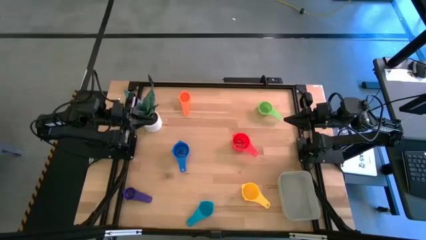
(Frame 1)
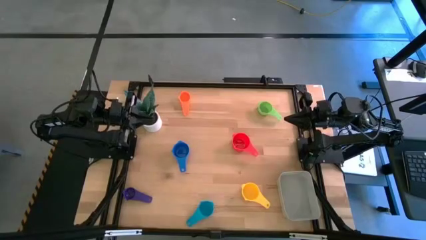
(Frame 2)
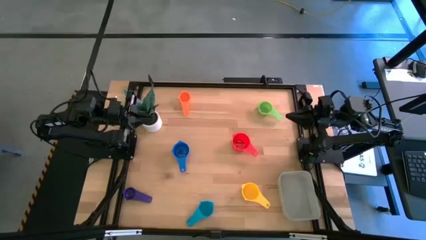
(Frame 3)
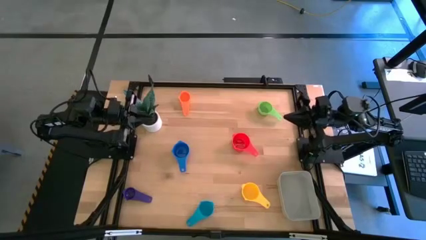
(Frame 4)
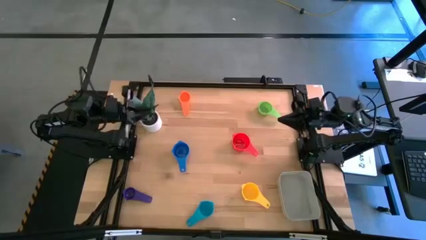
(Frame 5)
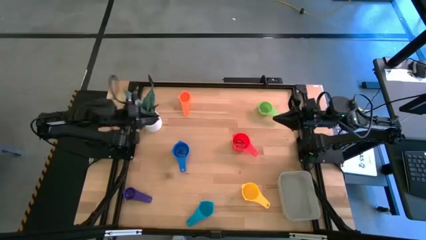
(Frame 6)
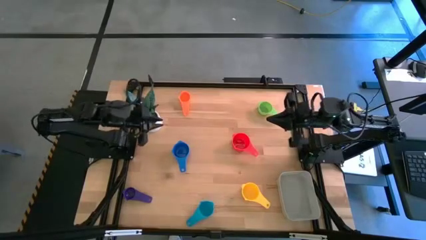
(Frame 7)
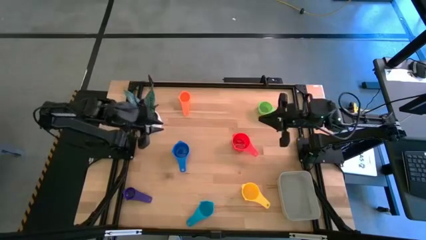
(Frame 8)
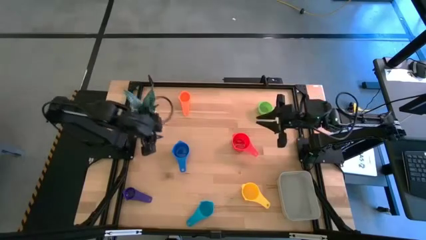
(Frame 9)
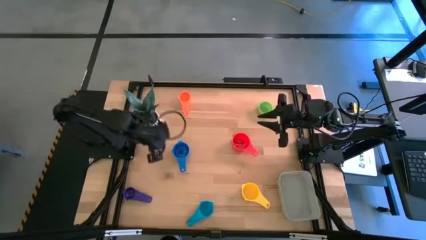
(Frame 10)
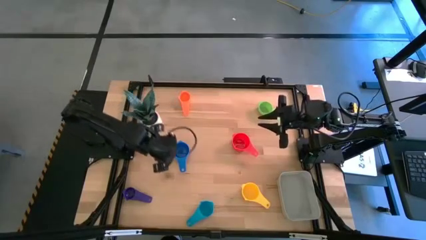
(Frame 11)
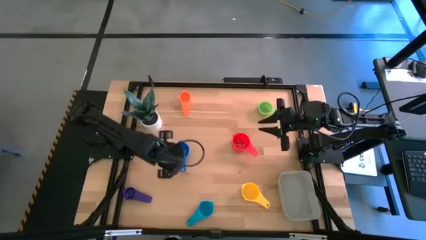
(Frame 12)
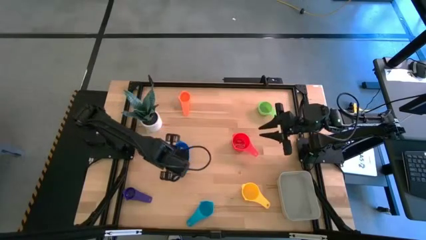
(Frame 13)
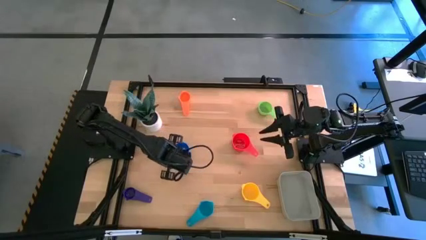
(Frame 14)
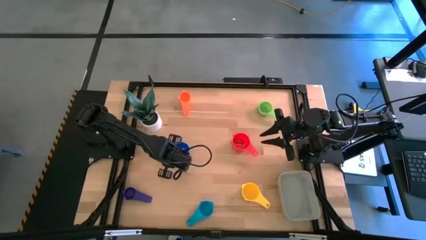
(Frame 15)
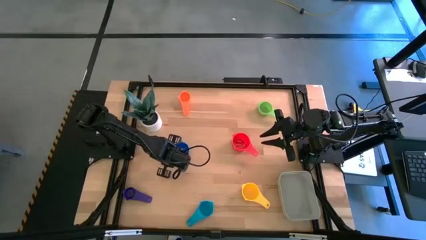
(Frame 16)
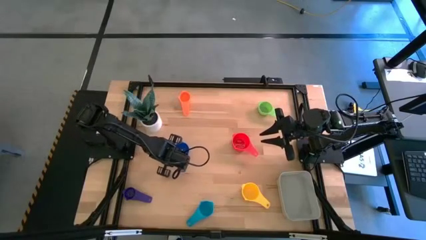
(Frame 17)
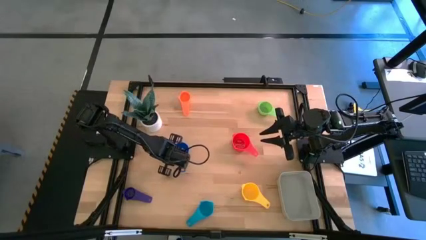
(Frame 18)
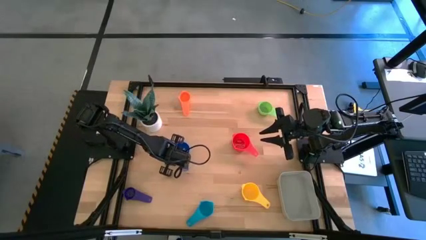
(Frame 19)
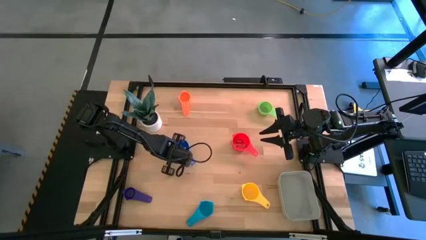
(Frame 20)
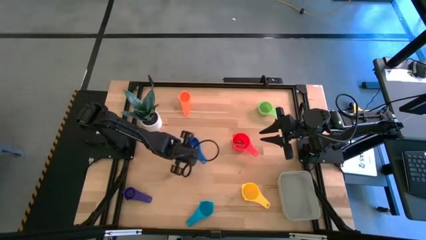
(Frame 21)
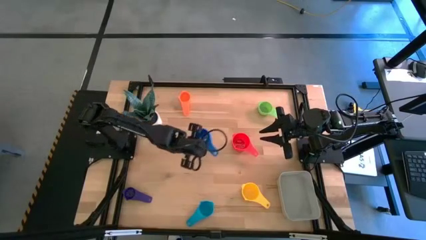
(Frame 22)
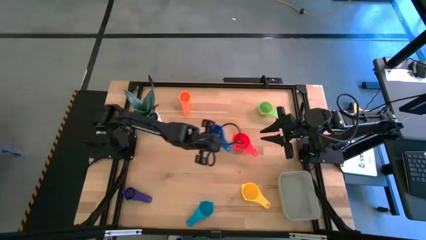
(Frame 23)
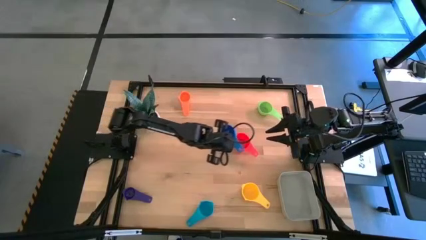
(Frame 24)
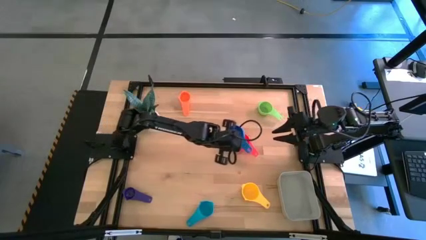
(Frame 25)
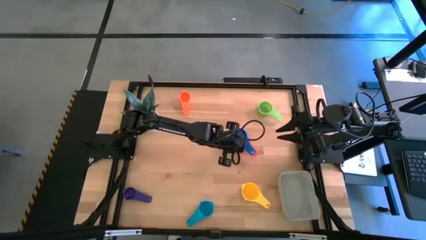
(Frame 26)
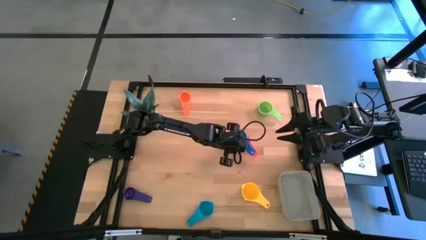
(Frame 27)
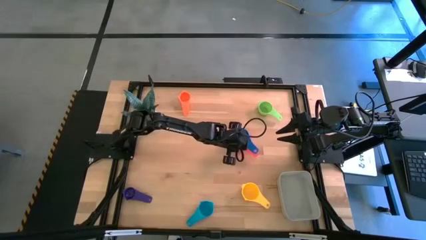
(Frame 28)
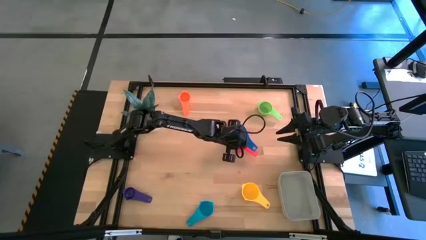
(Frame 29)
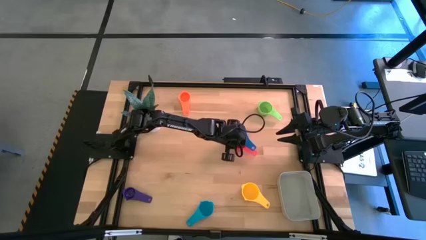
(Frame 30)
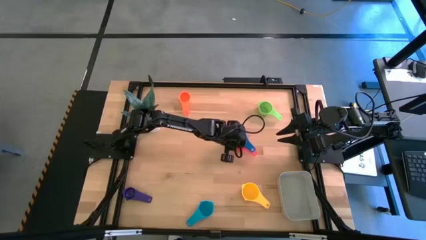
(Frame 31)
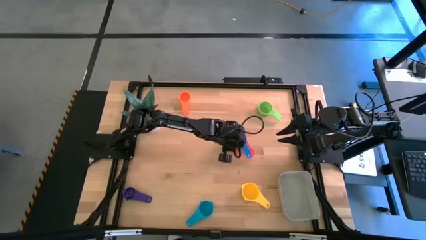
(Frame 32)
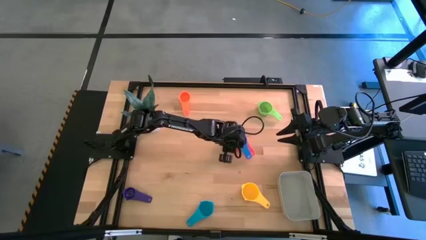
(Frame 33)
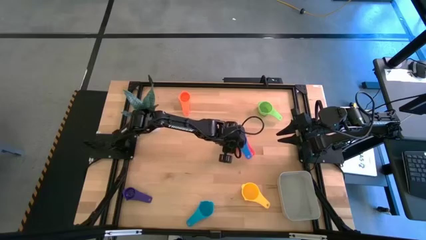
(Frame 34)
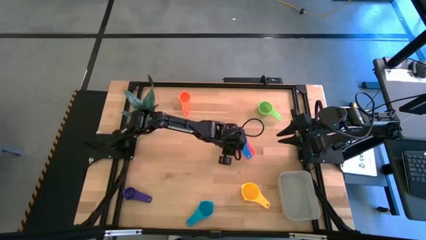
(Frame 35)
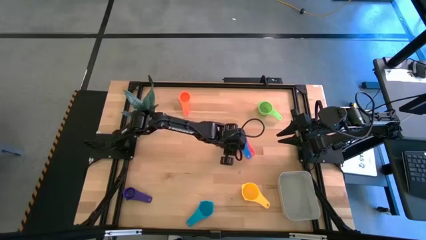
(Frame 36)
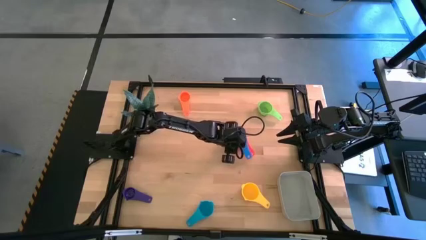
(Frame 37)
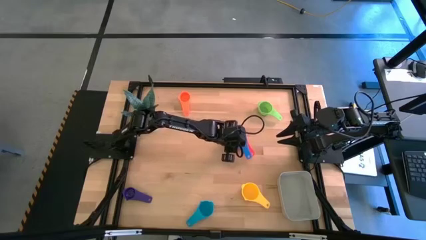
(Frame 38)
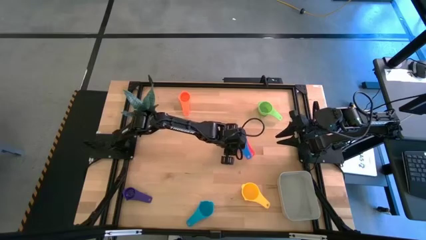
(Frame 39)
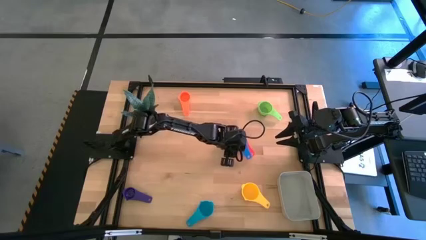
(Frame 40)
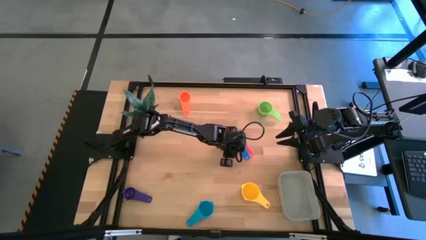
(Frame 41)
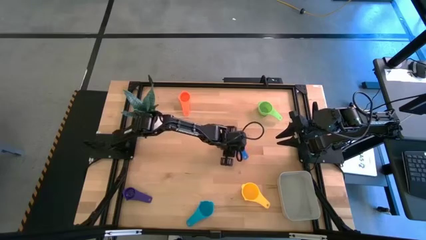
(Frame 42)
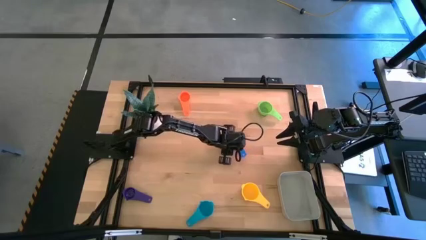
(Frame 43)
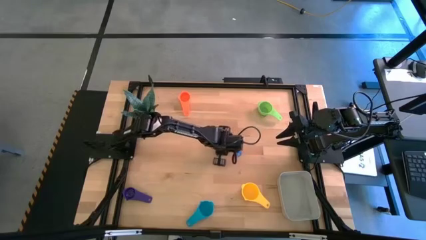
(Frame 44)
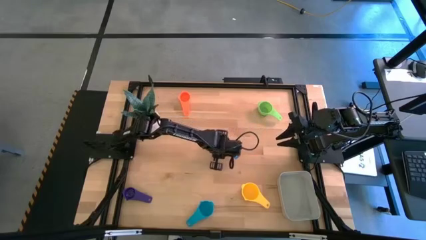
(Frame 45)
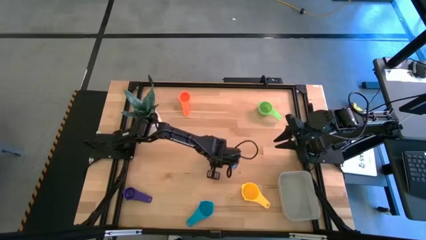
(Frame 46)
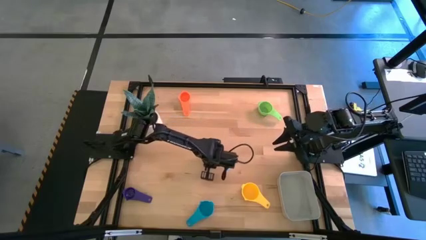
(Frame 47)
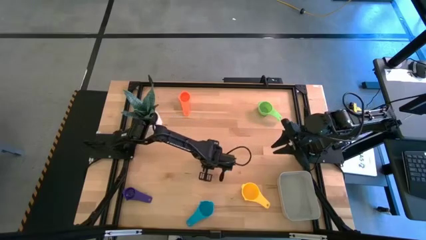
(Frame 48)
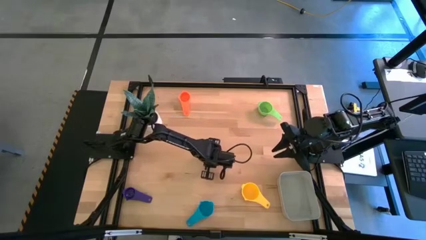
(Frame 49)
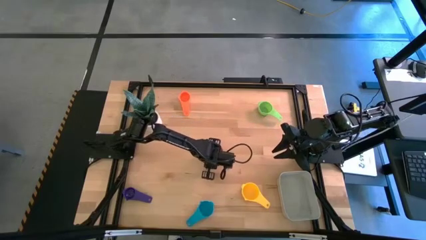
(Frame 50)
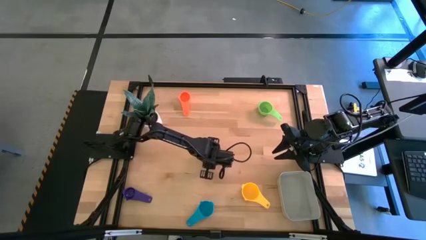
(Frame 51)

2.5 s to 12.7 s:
Task: Nest measuring cups in basket
Stack the dark blue measuring cup on top of the red measuring cup

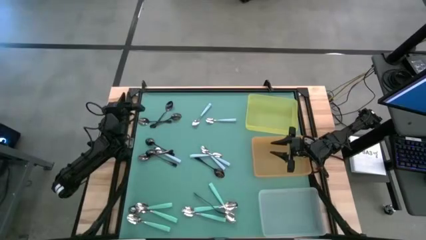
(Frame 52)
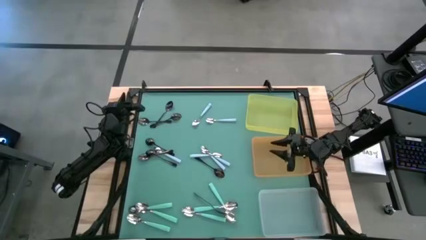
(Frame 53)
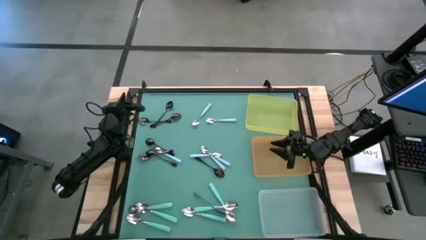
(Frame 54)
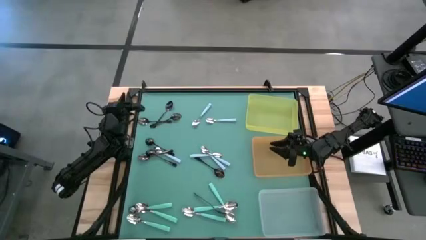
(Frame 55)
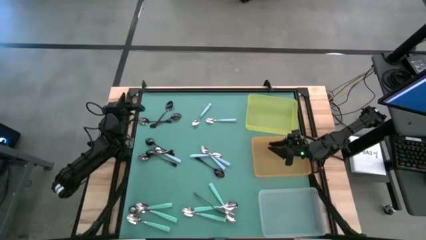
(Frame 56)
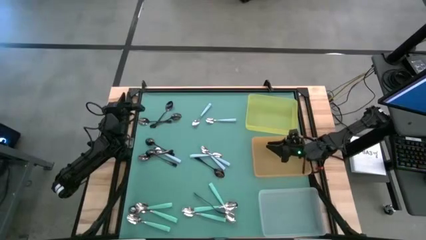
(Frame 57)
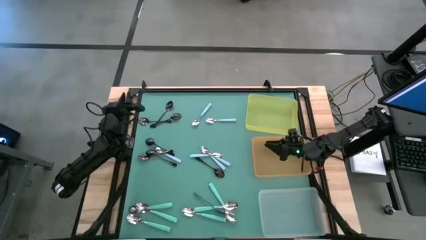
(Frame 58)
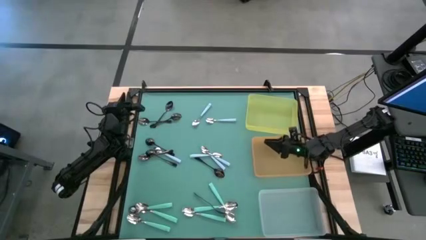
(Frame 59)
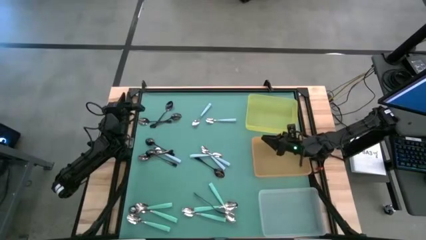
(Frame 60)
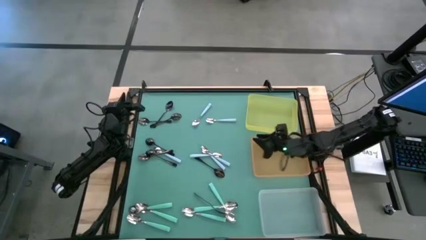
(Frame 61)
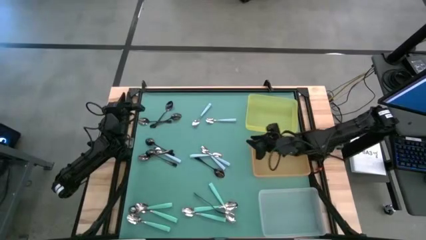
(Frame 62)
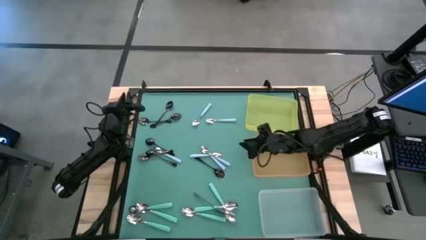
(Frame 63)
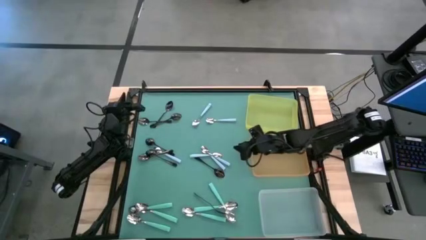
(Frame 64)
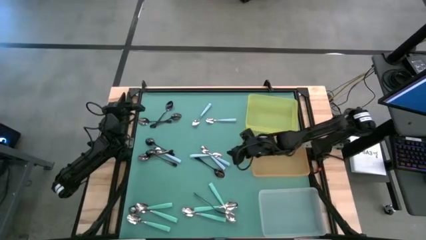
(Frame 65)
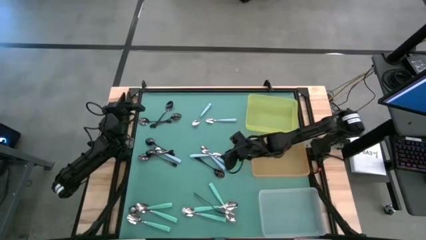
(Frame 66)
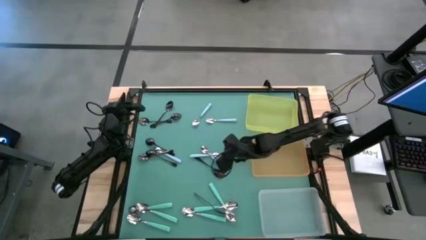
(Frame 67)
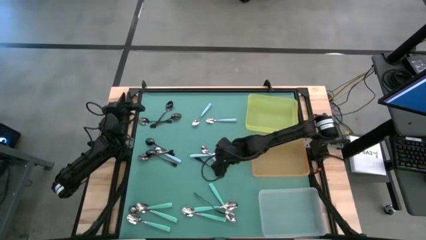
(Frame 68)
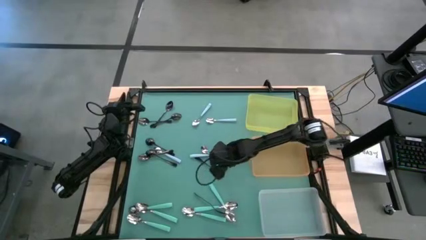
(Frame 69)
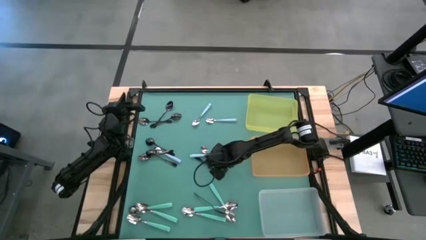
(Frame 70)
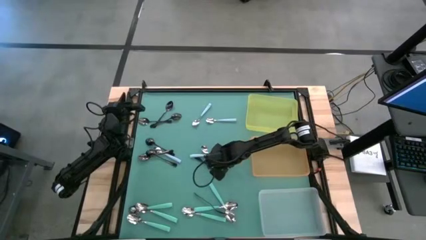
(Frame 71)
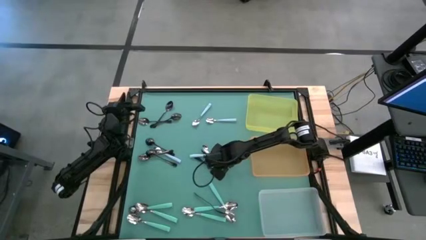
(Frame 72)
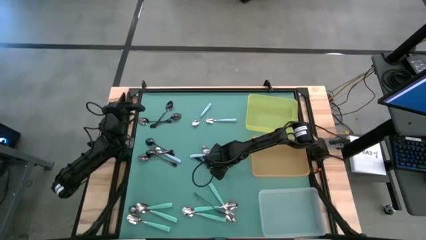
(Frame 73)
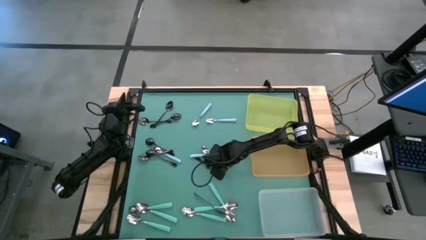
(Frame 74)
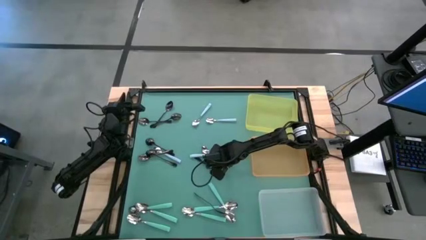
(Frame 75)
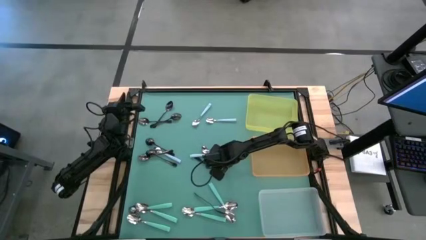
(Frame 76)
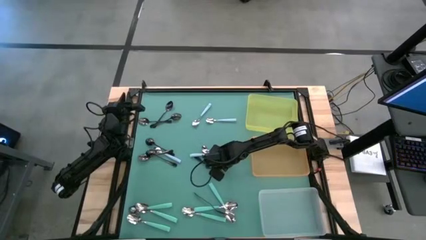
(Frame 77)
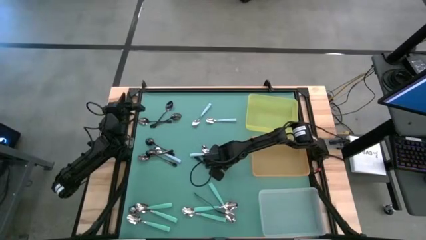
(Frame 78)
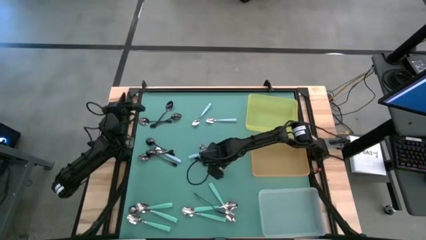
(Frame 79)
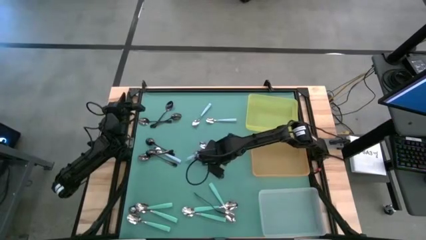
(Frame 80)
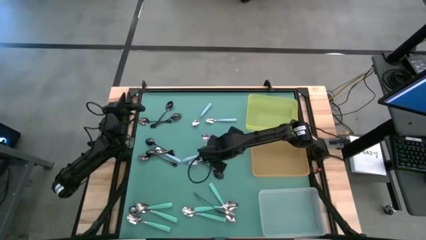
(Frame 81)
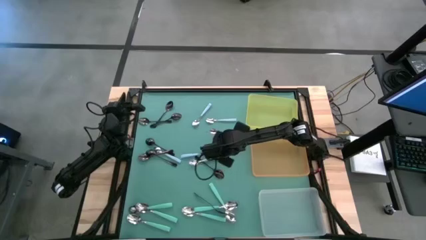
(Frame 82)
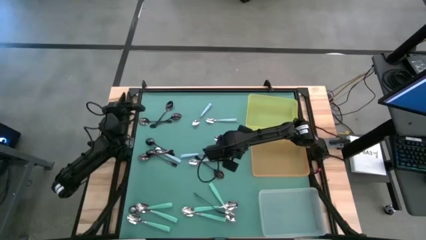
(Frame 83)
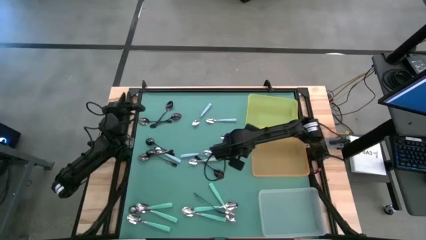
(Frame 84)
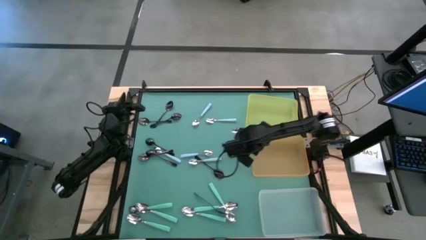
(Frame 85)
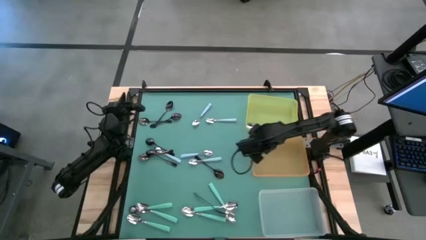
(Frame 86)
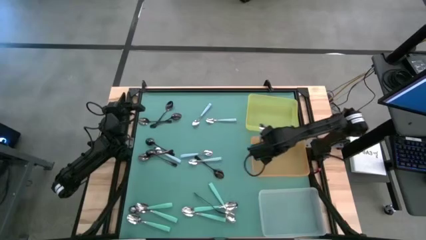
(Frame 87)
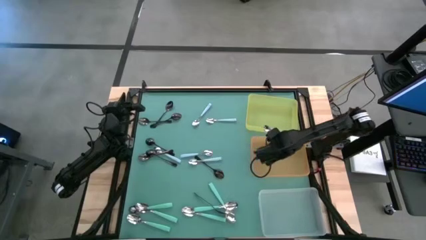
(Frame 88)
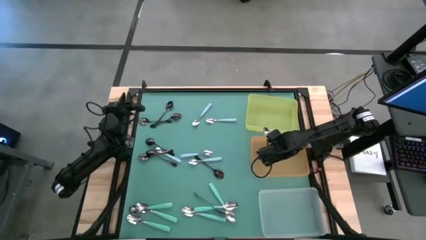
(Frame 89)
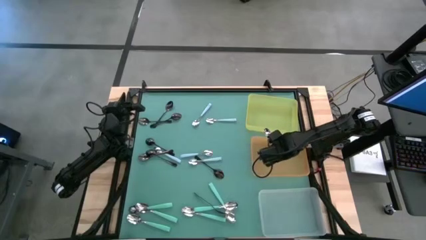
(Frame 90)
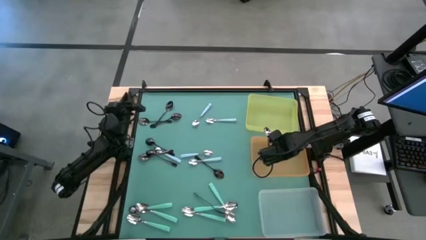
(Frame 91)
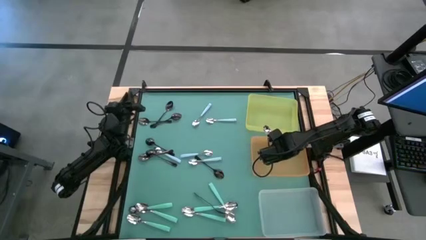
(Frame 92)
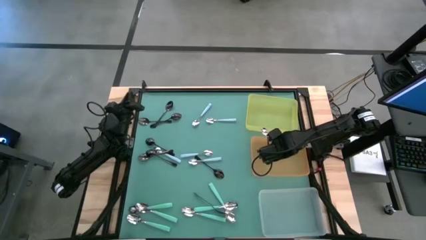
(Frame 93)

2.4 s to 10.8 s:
Task: Sort silverware by color (type)
Put the blue spoon into the orange bin
